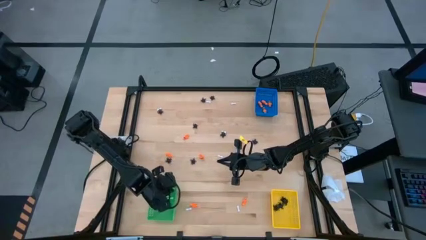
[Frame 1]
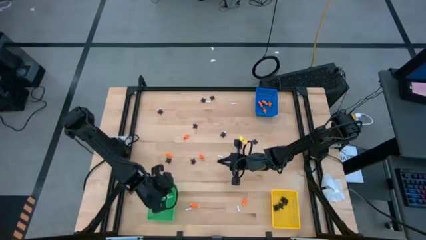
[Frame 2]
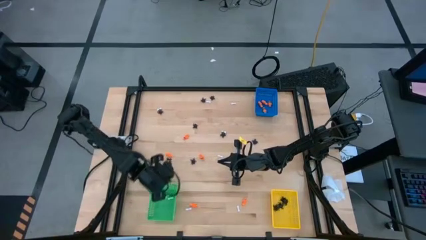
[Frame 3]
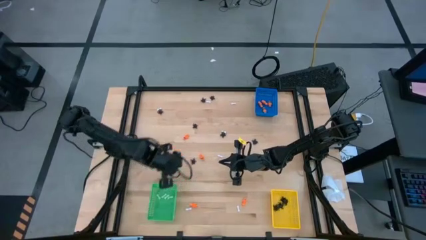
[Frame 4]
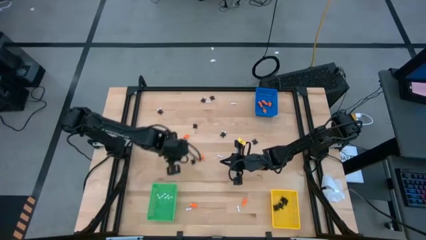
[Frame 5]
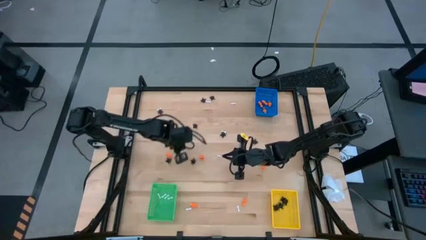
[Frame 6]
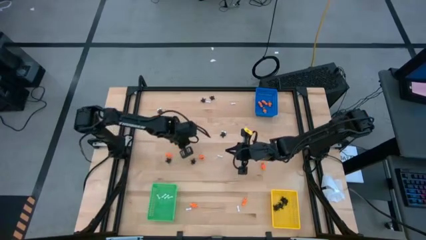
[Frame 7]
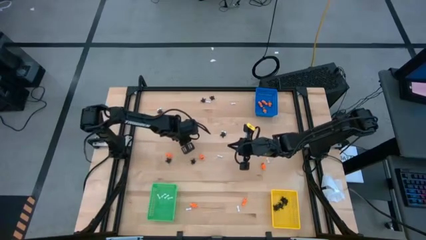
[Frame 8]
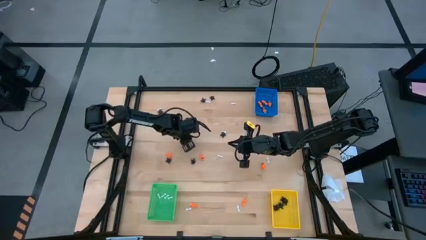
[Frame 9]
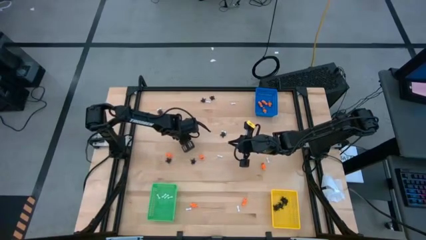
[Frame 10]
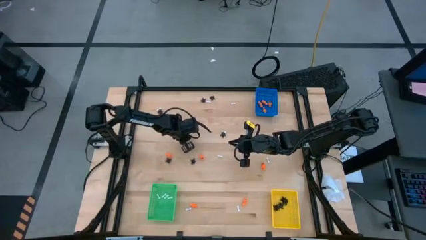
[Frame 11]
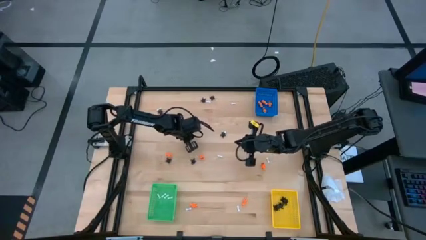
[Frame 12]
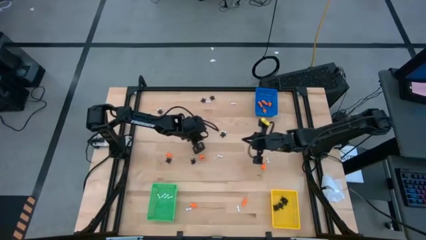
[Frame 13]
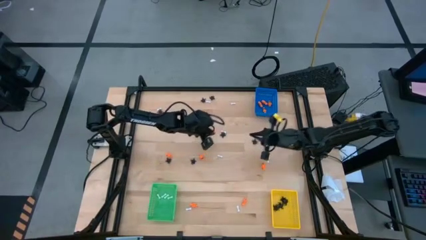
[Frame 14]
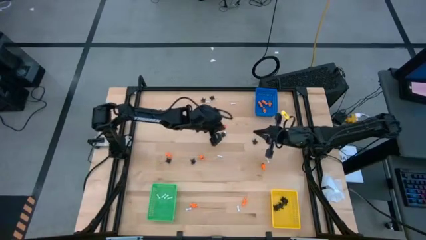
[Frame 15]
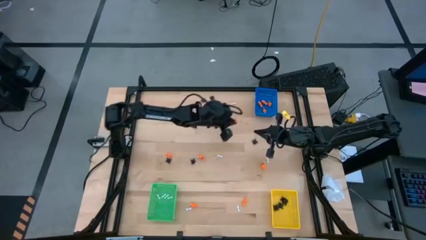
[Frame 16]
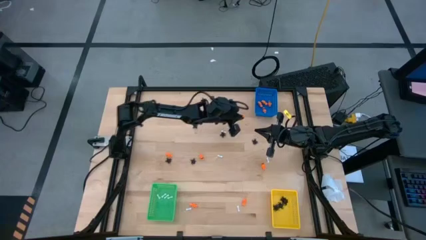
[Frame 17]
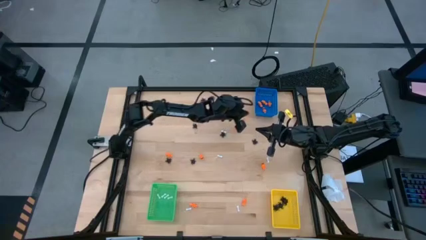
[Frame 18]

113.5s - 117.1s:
Task: Sort Halloween decoration
Adjust the green bin into the bottom left

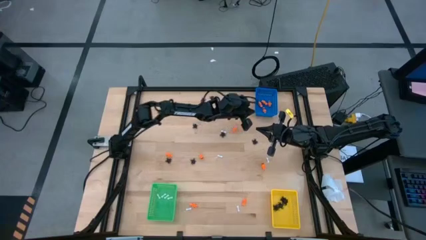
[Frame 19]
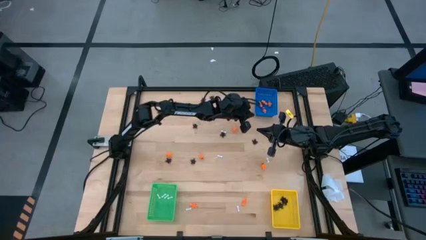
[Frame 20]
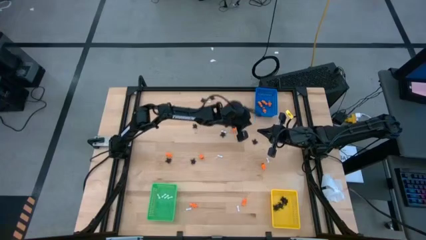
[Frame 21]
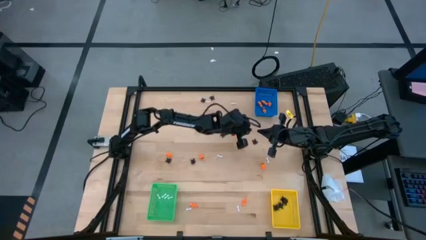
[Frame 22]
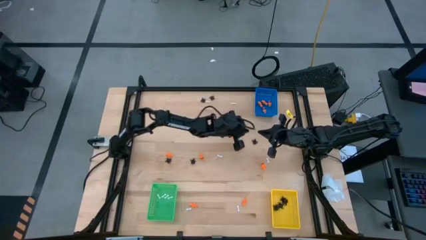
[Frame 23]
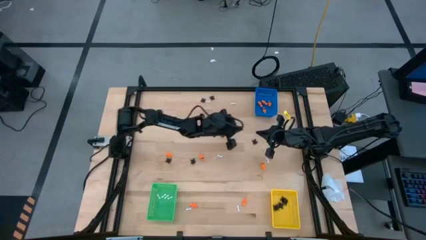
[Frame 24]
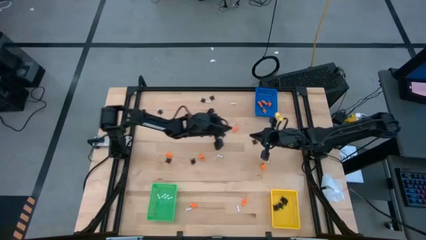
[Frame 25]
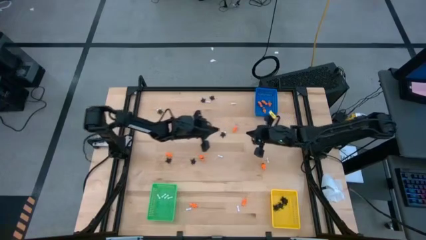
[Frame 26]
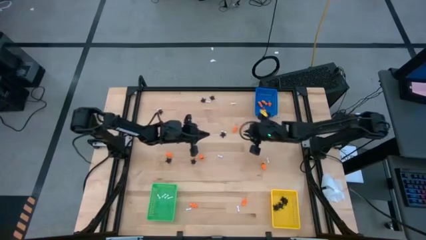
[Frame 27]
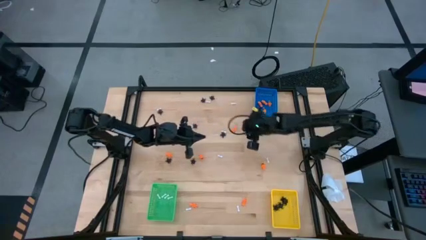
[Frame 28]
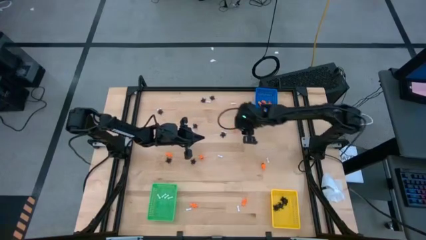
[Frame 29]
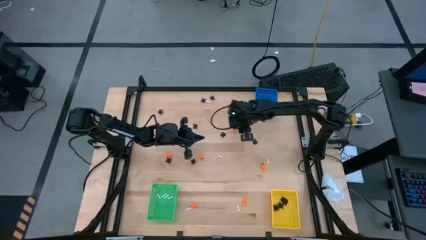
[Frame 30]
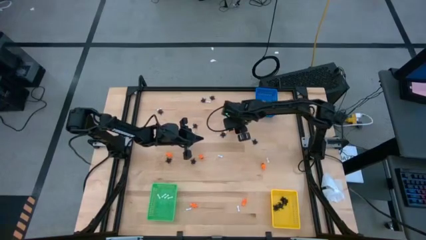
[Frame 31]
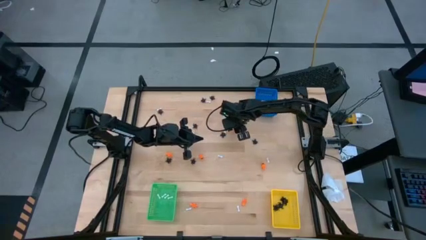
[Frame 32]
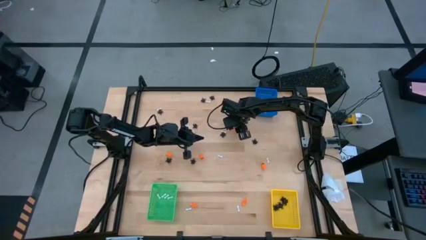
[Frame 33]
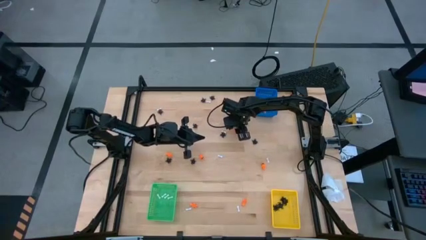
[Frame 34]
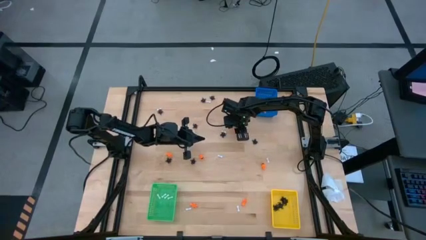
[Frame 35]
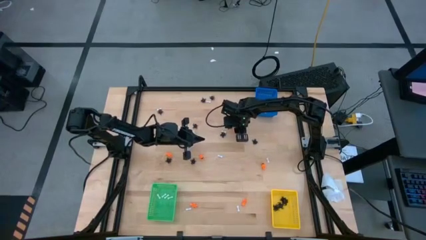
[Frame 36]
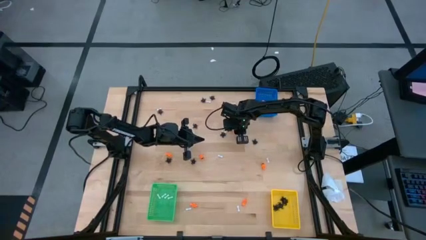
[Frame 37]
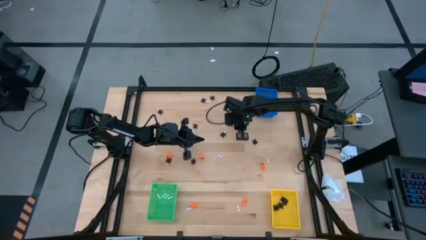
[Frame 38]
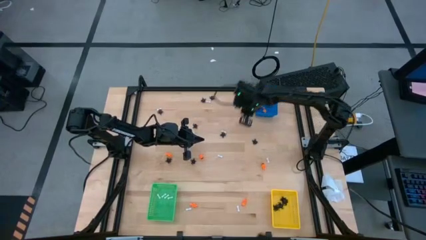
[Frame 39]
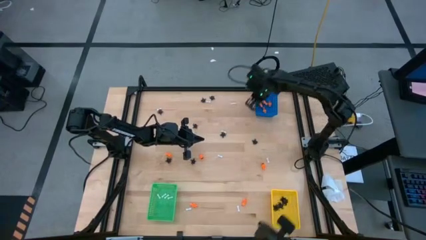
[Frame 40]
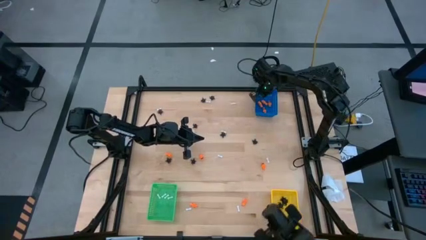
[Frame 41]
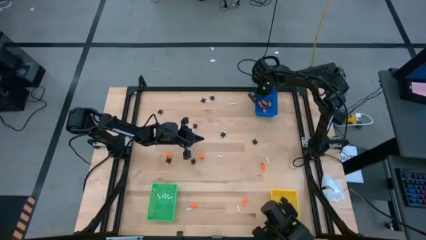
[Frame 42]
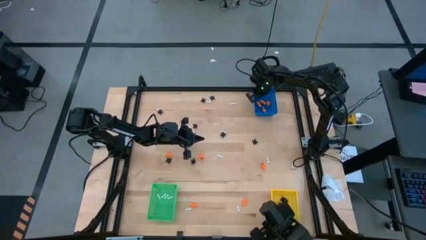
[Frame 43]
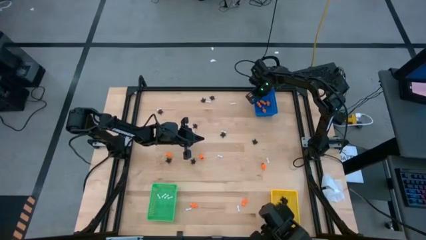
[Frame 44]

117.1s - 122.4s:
Put the orange toy skeleton into the blue bin

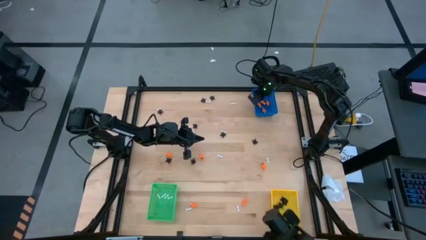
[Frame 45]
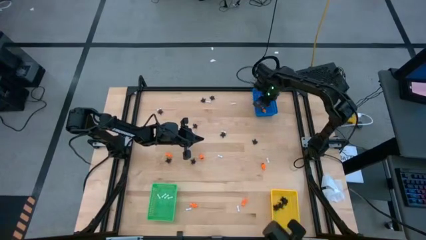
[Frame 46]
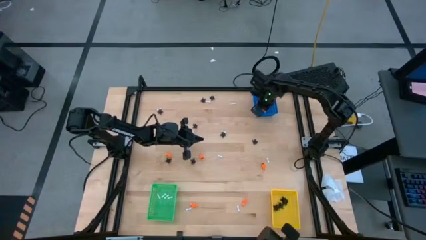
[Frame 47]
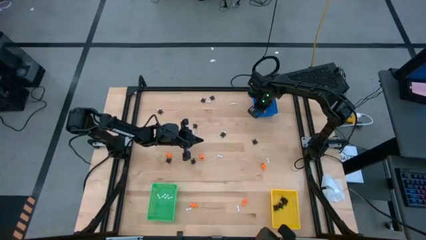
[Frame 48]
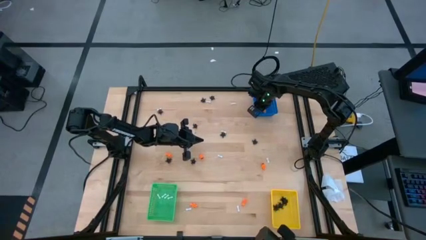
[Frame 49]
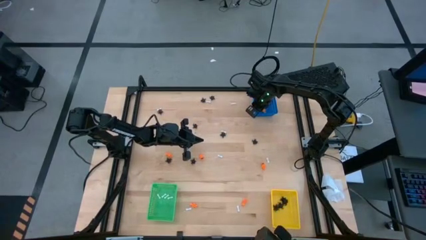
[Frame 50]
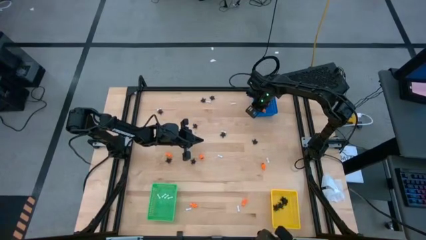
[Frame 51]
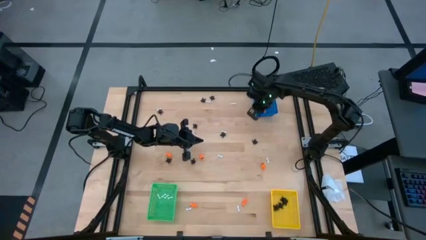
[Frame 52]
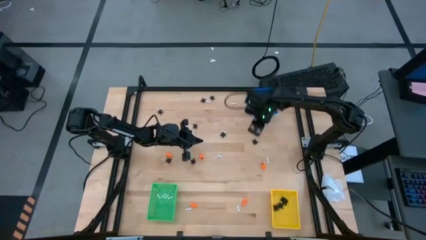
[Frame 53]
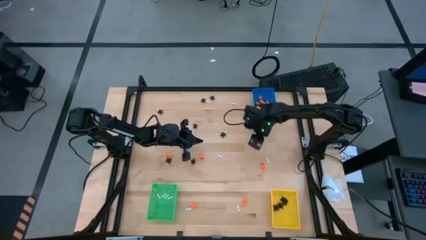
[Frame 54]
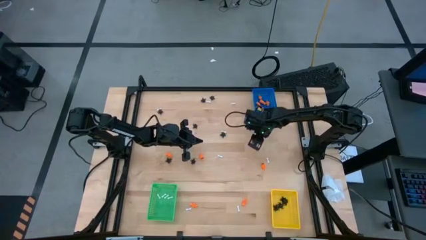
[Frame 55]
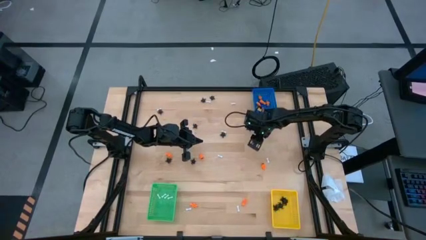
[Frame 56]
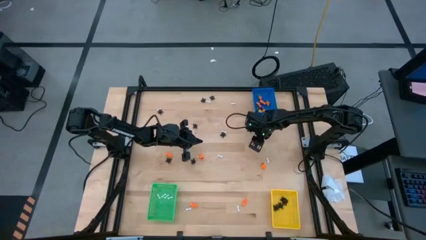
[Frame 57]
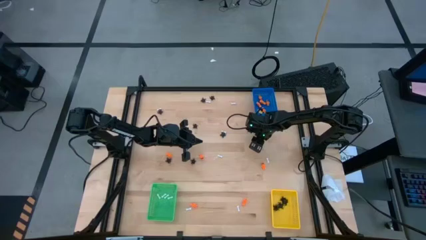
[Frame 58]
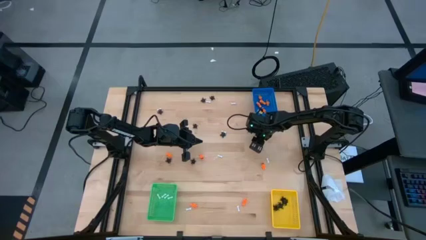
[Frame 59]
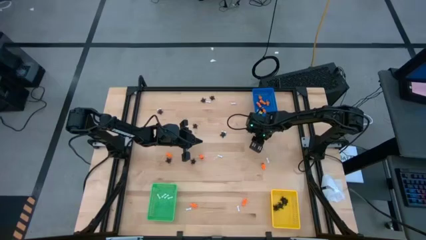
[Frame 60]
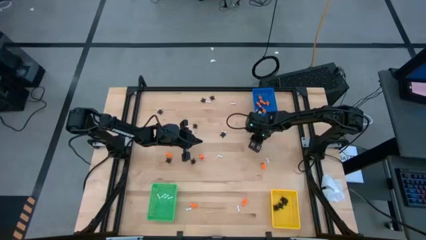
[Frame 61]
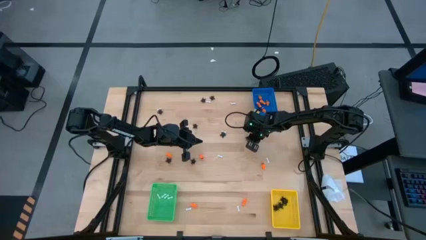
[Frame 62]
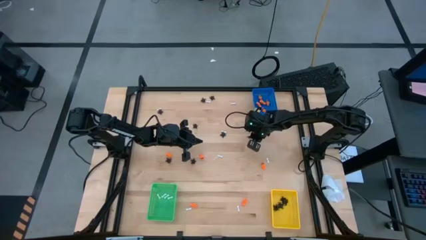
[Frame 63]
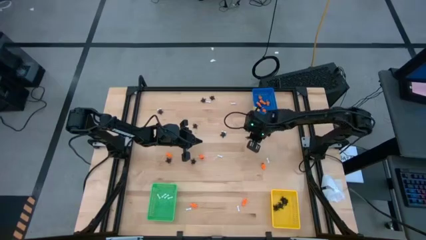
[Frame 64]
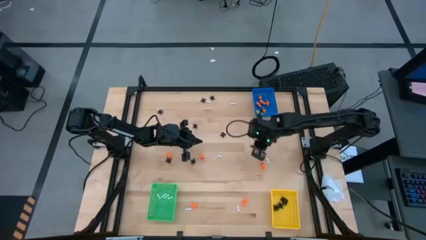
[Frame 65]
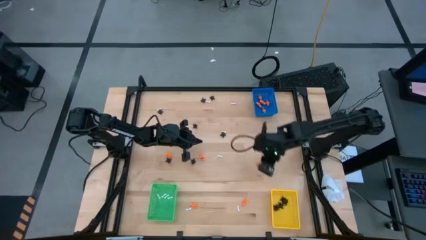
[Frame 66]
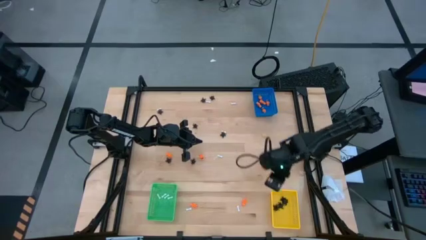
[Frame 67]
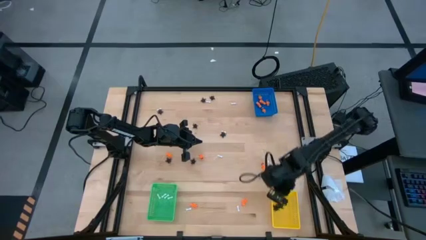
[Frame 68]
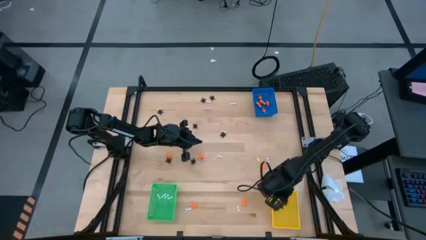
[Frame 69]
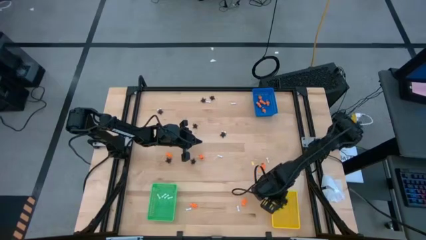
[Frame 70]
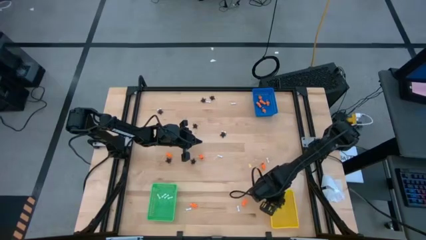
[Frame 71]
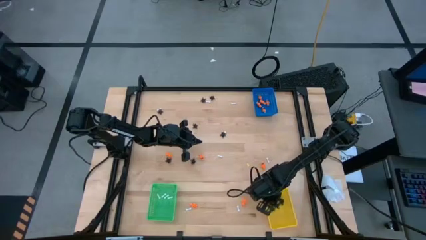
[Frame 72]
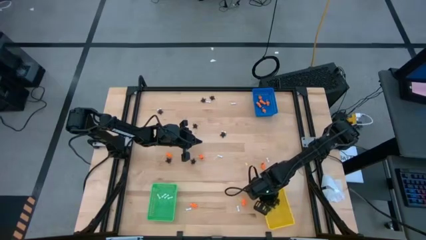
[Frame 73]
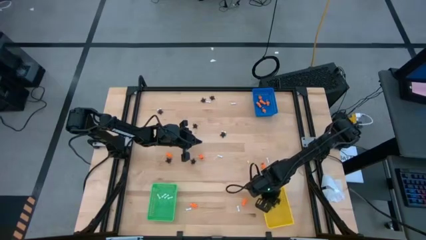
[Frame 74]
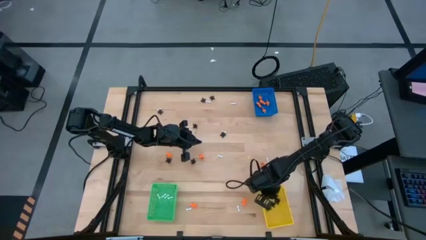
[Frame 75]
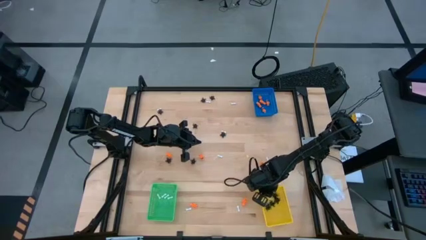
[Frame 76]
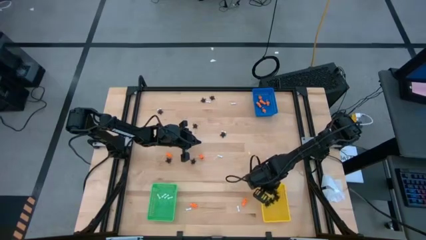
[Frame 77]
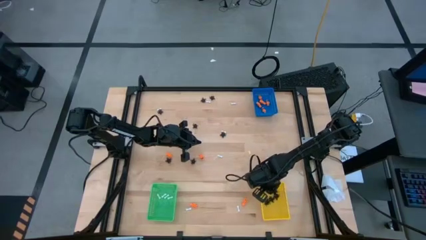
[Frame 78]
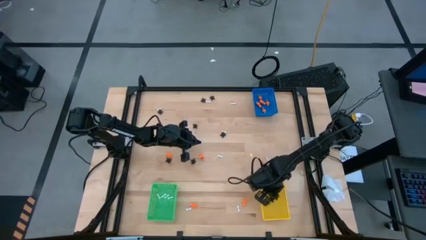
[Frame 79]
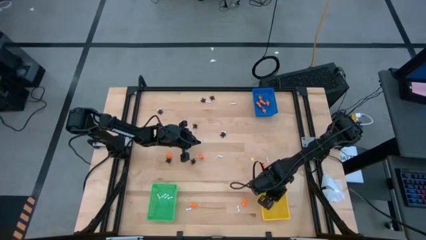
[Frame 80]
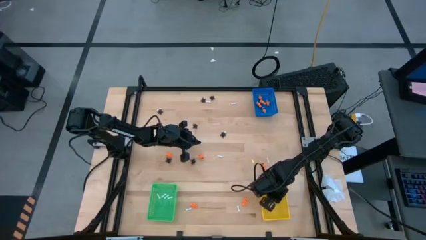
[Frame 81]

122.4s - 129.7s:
Put the black spider toy into the yellow bin

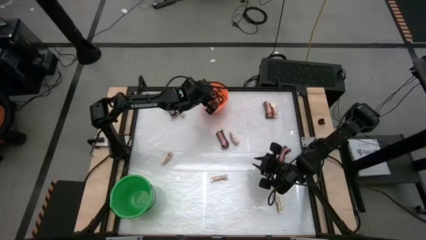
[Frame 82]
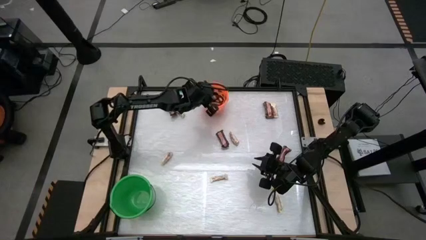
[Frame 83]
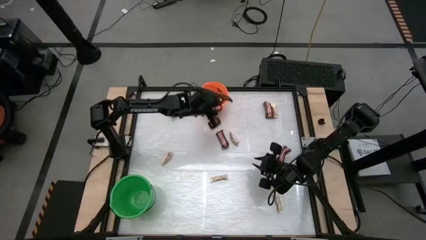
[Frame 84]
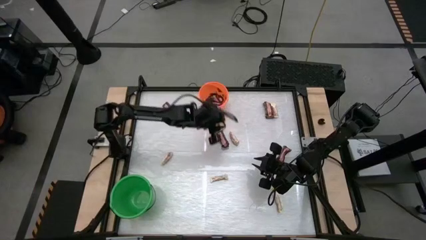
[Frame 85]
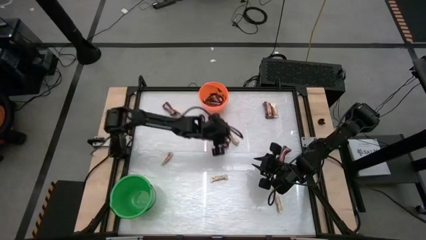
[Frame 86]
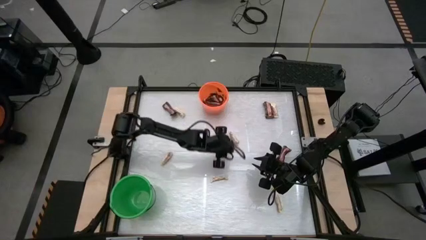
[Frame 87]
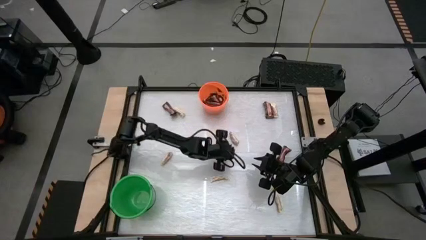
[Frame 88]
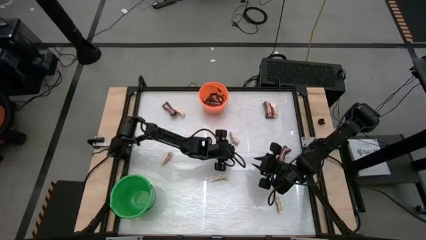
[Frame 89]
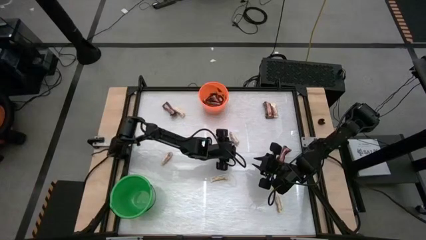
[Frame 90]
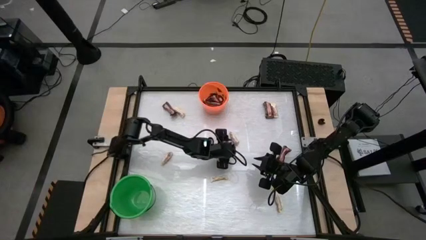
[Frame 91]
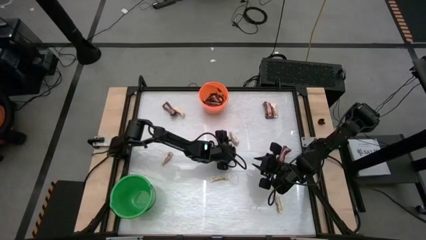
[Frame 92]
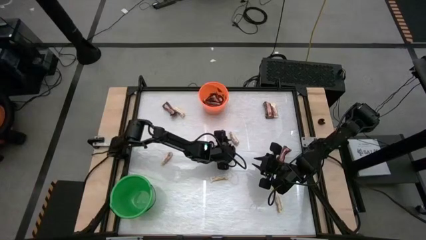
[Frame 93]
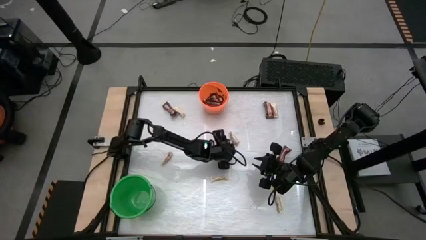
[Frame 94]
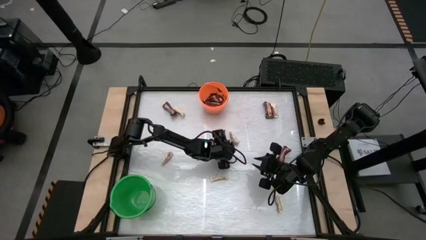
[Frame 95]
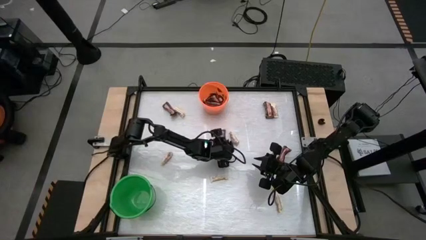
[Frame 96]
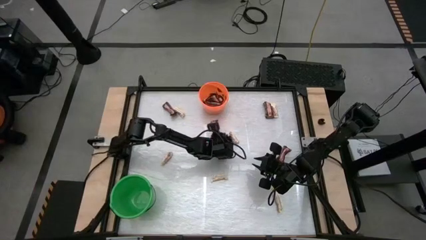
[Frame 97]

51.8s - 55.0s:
Task: Sort candy by brand, put in halloween buckets
Put the brown chocolate bar into the orange bucket
